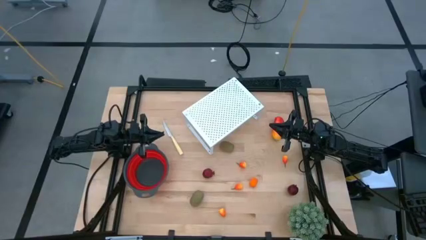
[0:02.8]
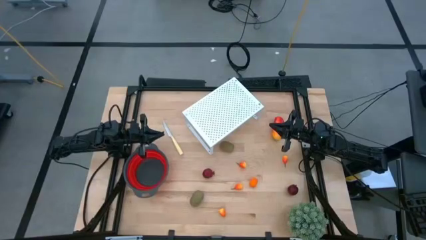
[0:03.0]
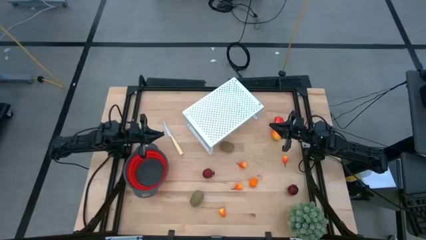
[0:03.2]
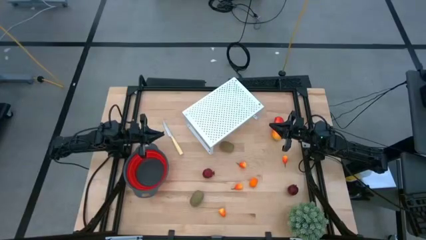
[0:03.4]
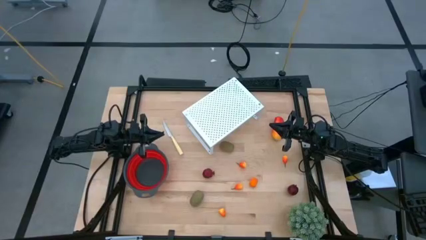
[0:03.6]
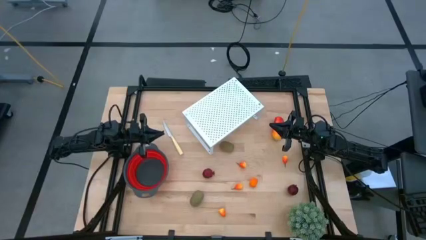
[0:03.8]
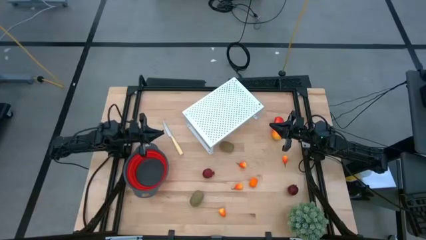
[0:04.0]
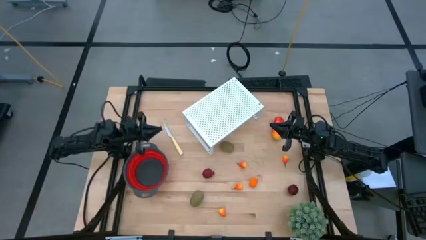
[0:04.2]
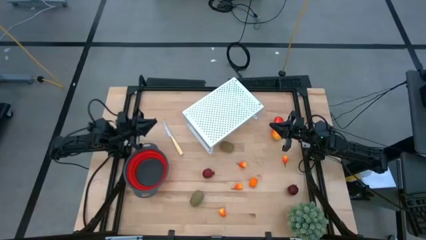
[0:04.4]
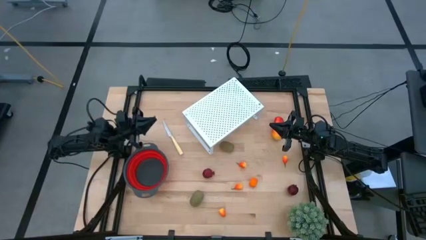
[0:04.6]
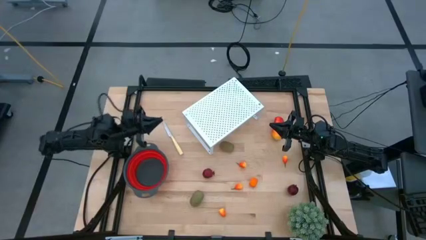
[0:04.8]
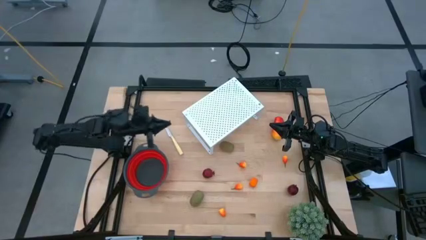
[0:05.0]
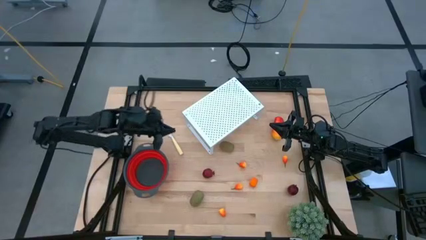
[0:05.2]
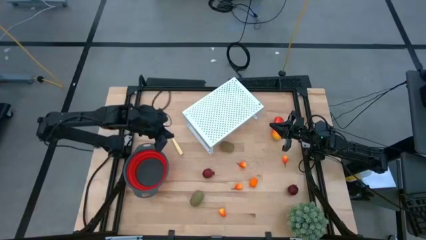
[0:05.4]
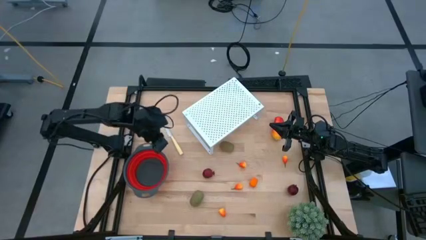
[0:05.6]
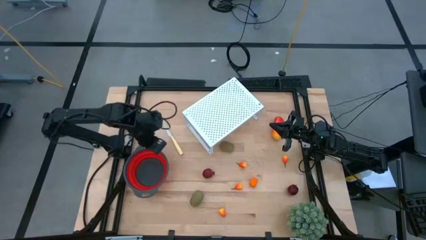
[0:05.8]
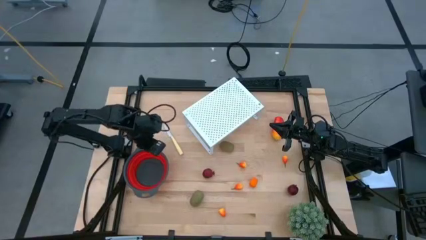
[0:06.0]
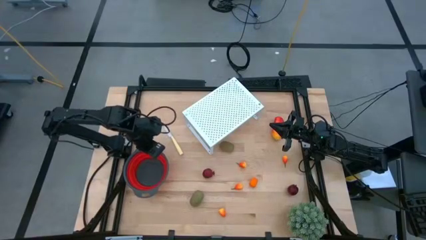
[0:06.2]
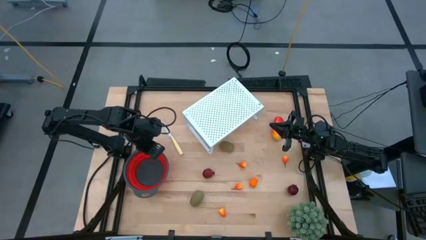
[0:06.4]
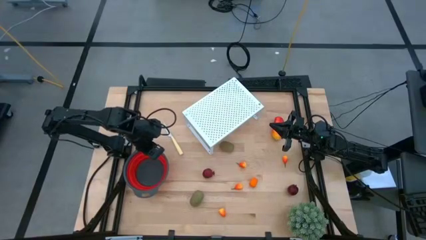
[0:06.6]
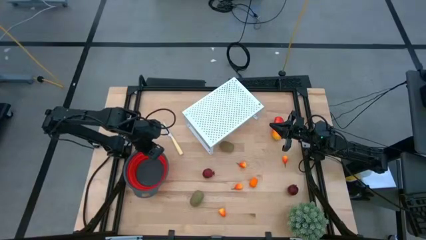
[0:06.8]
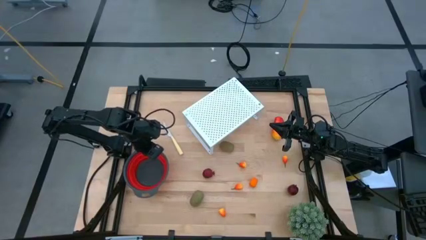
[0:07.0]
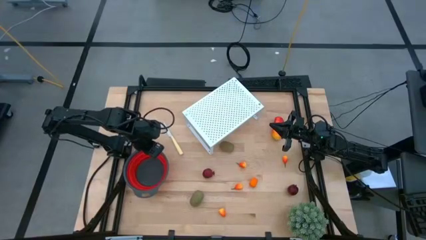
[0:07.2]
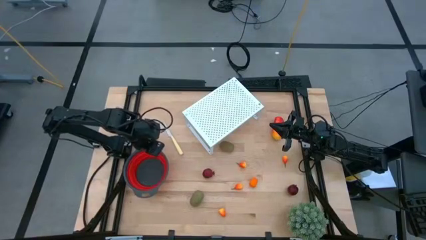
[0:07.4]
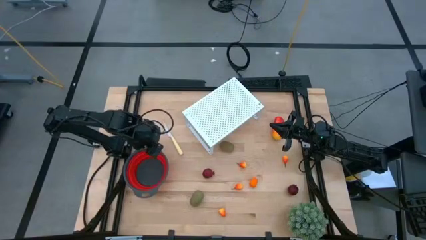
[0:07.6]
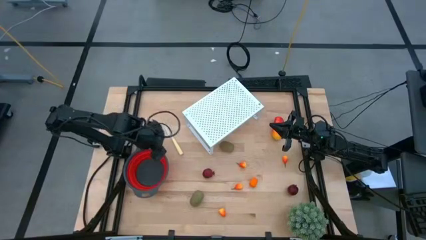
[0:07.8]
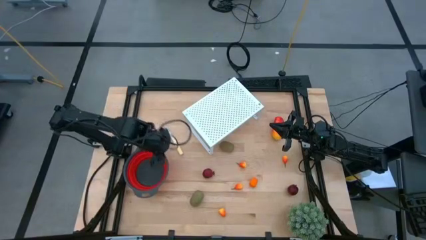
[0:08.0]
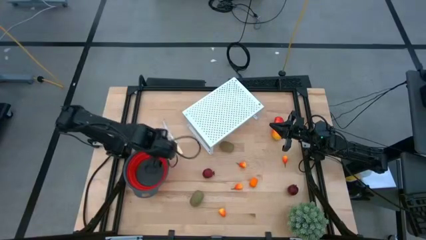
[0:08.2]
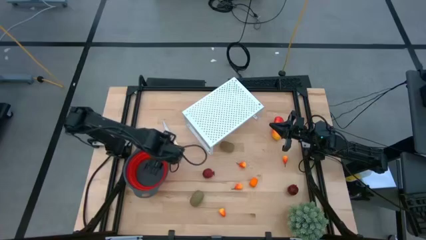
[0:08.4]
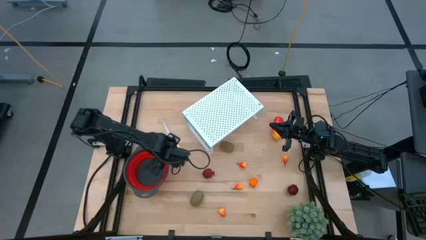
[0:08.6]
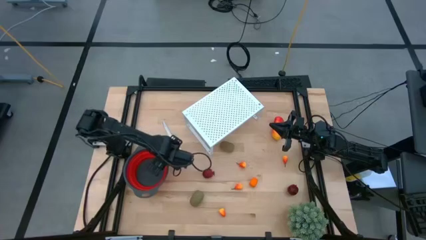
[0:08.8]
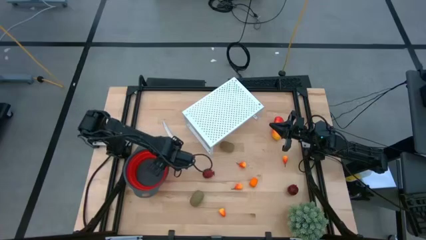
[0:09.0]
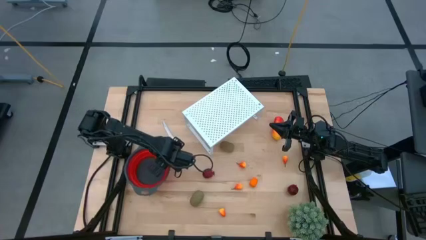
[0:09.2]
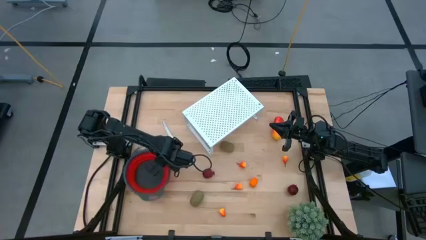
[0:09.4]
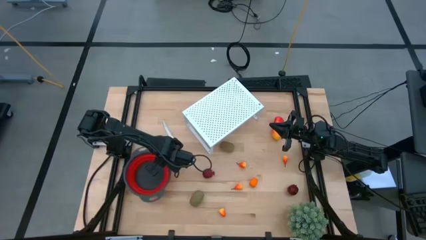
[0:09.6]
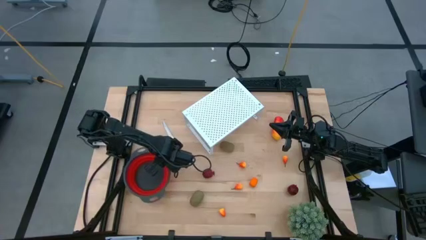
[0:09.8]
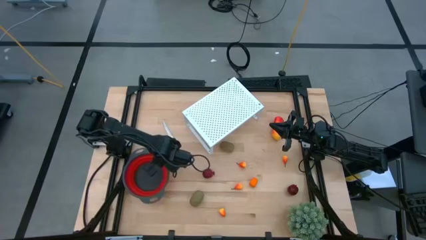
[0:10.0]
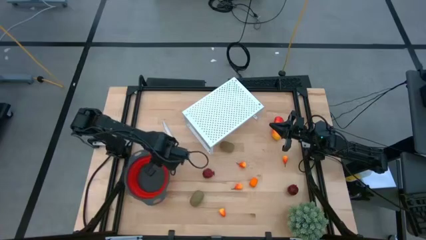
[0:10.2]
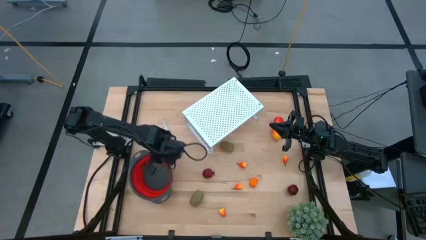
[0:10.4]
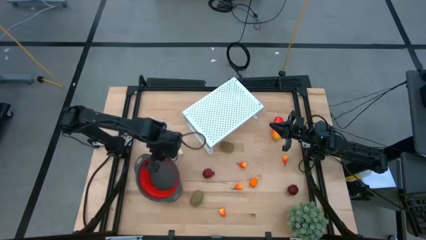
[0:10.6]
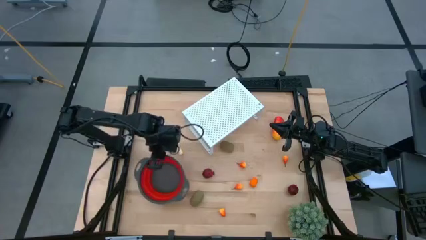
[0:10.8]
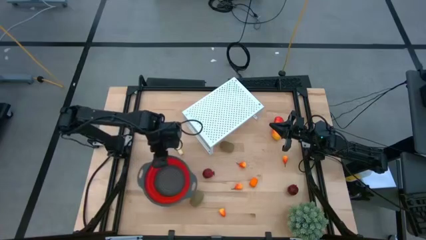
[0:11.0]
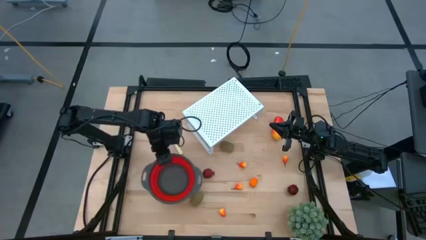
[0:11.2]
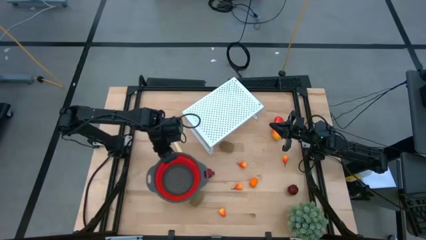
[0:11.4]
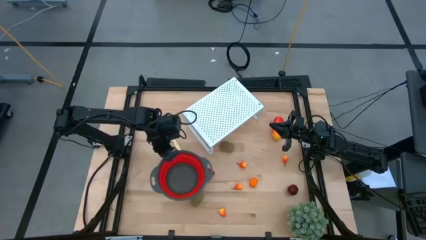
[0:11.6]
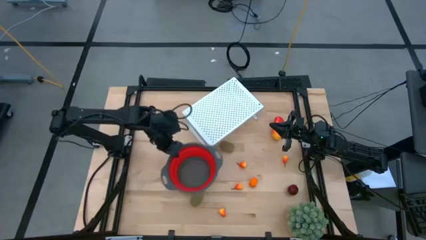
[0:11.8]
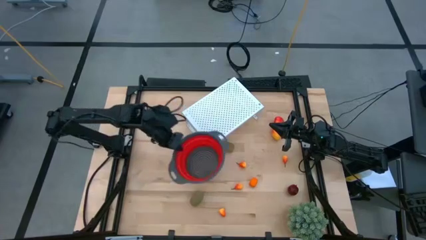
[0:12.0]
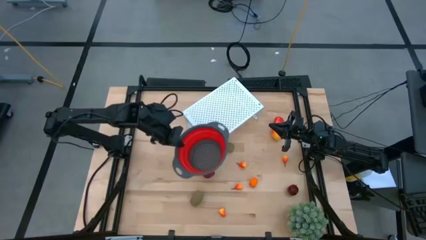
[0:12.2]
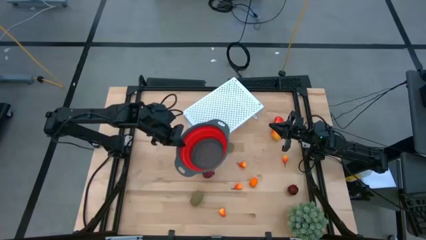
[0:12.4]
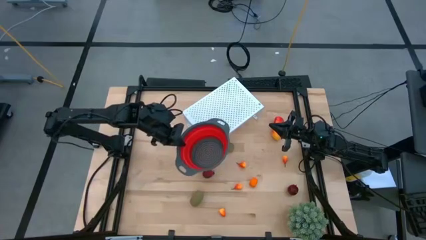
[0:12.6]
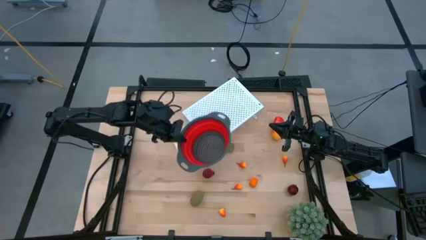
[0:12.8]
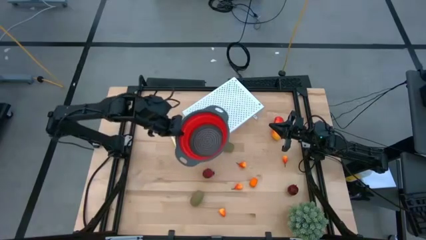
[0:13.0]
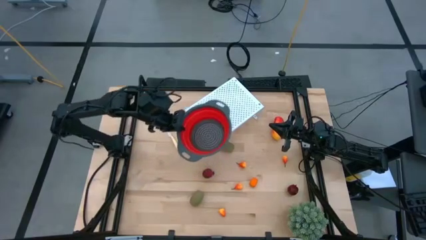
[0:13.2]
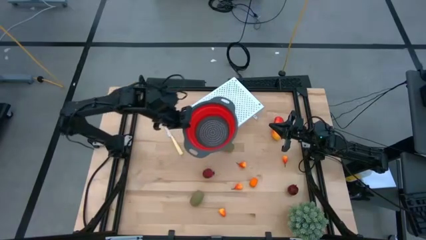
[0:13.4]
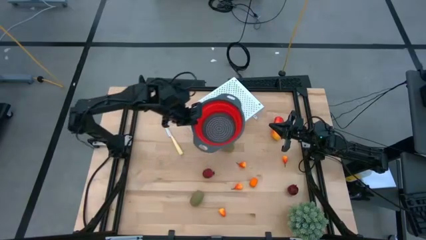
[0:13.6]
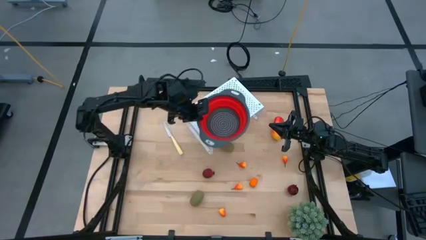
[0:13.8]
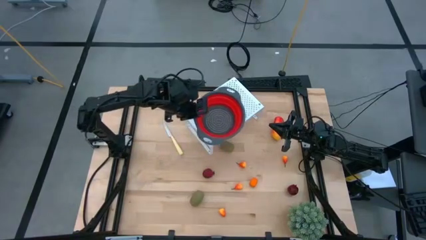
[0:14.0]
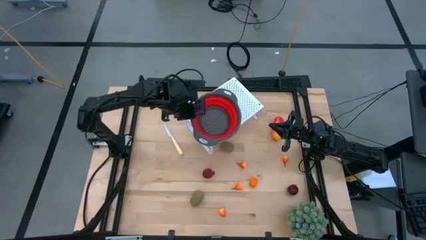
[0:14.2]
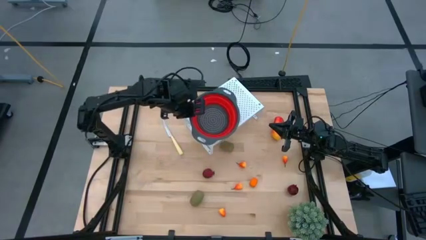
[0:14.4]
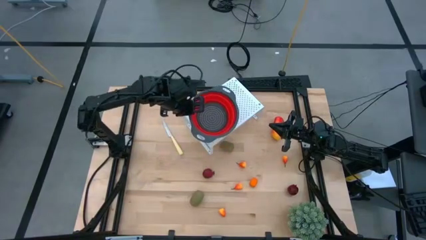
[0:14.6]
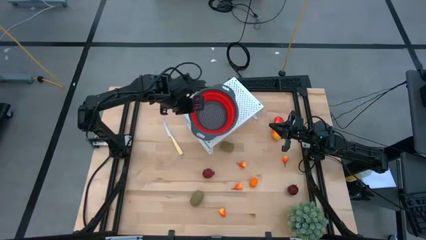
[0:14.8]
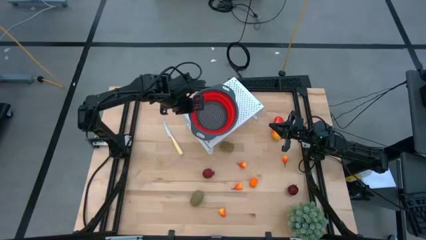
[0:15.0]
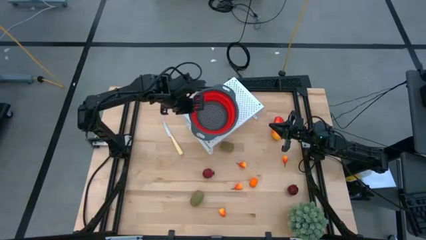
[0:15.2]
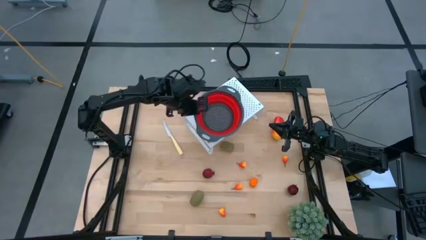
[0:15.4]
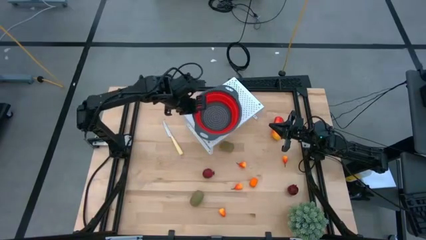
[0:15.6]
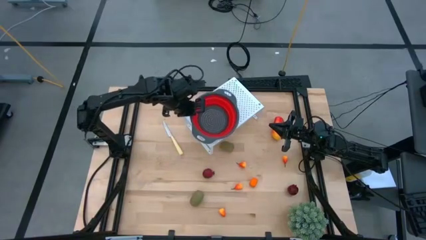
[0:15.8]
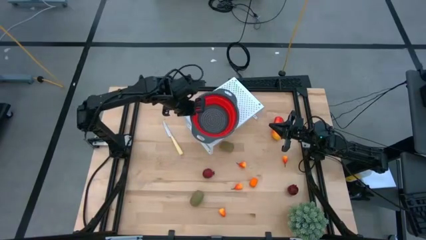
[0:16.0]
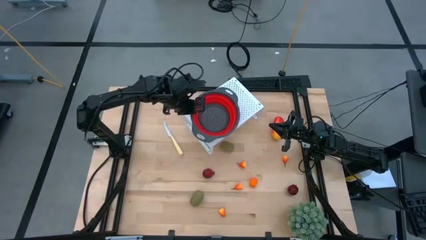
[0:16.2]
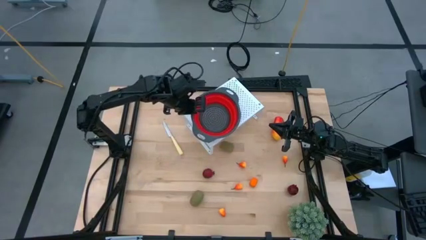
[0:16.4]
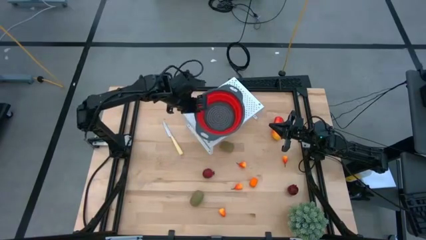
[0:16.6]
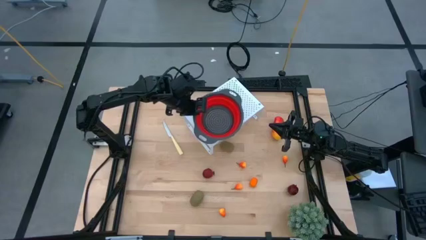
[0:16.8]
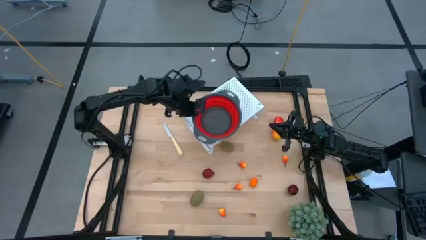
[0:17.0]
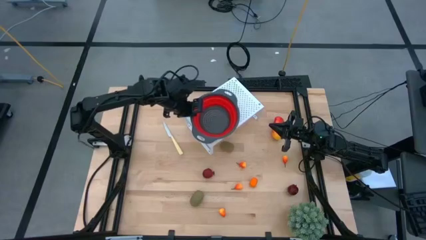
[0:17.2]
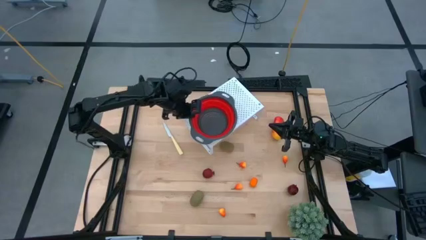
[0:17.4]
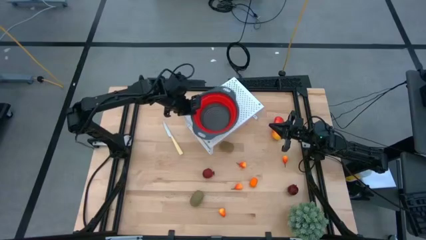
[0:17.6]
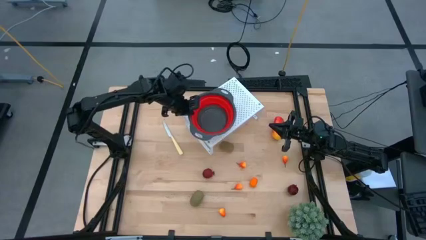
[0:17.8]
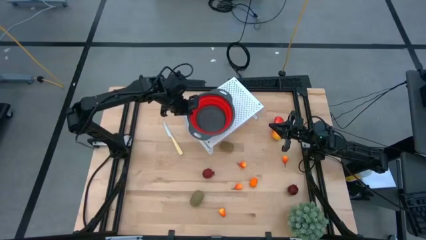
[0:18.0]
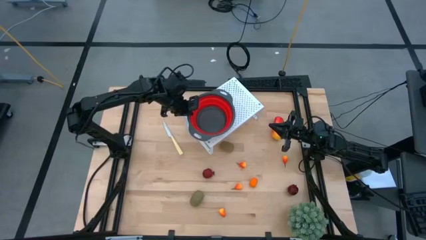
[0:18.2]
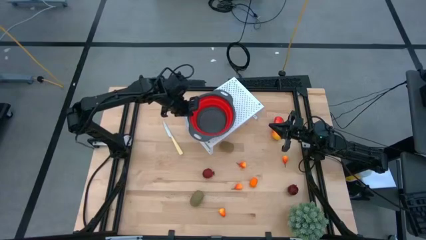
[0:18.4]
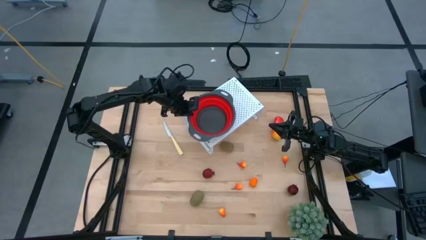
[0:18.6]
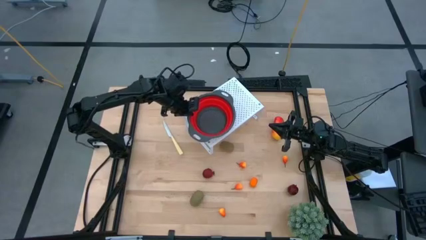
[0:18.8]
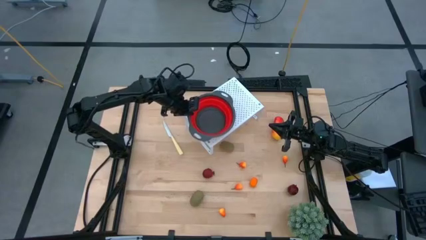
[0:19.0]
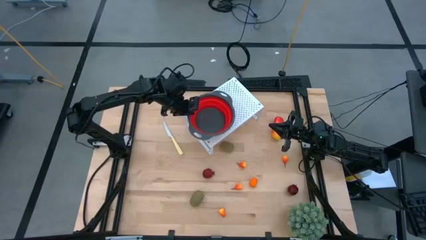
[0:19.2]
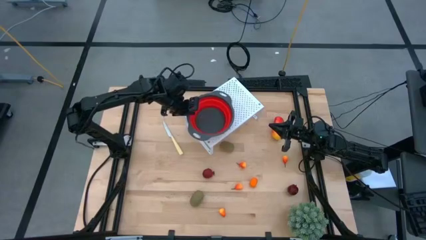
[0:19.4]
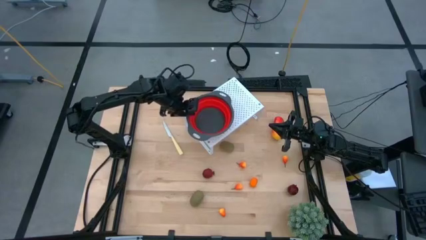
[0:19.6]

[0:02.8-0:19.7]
Task: Pick & Place Fruit
Put the red strainer bowl on the shelf
